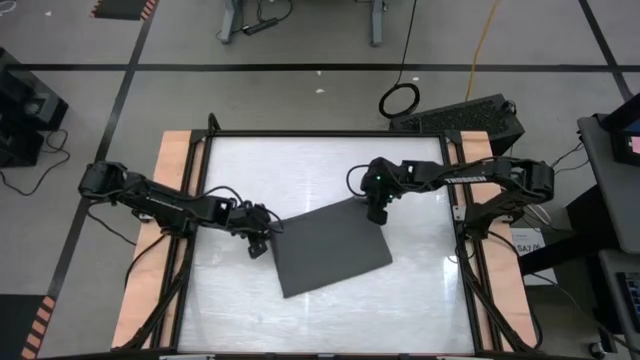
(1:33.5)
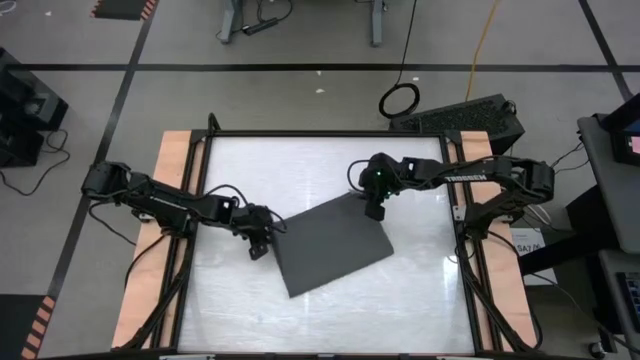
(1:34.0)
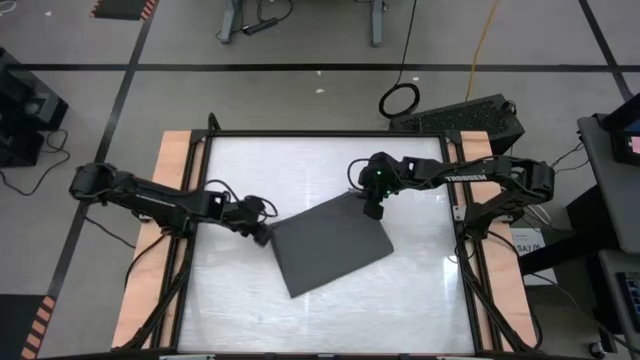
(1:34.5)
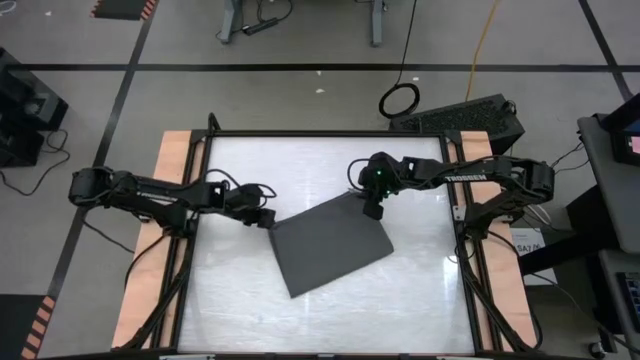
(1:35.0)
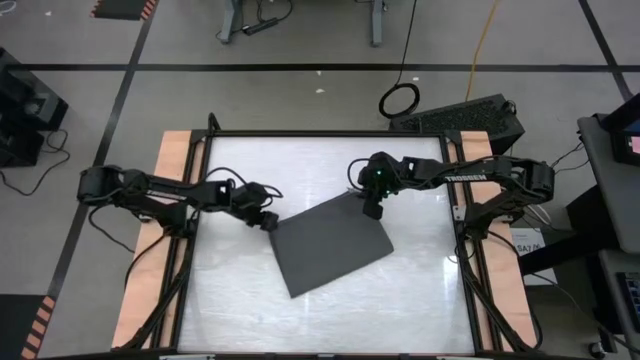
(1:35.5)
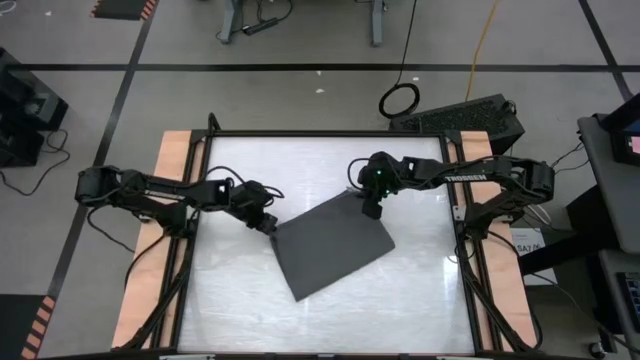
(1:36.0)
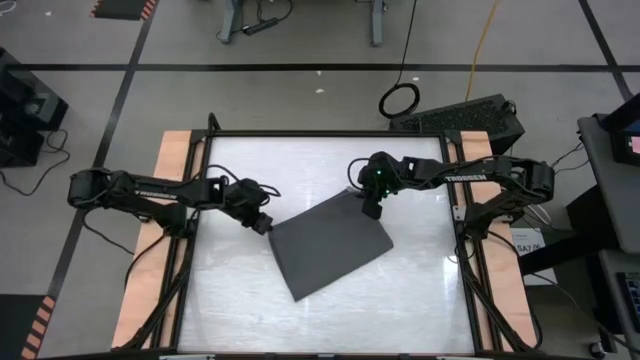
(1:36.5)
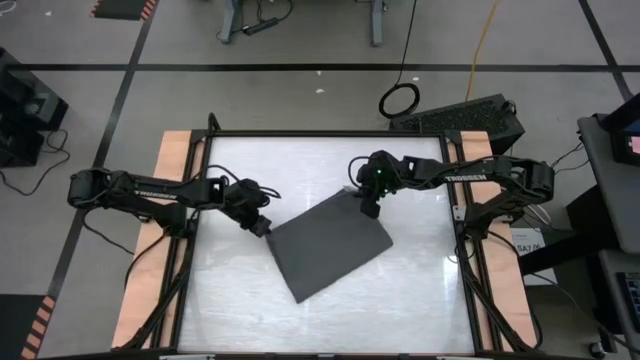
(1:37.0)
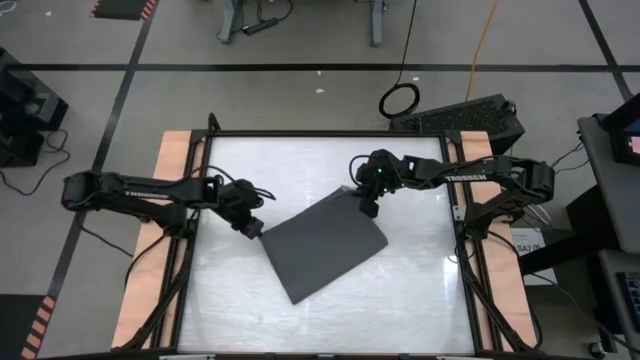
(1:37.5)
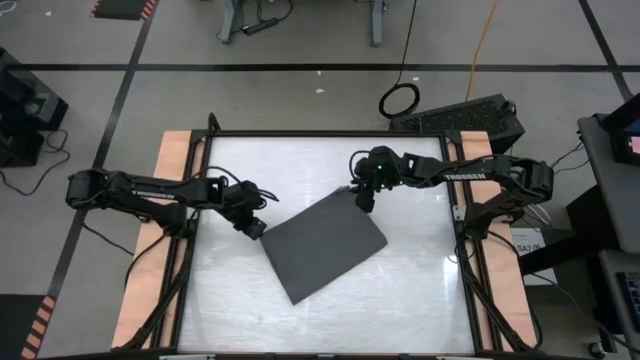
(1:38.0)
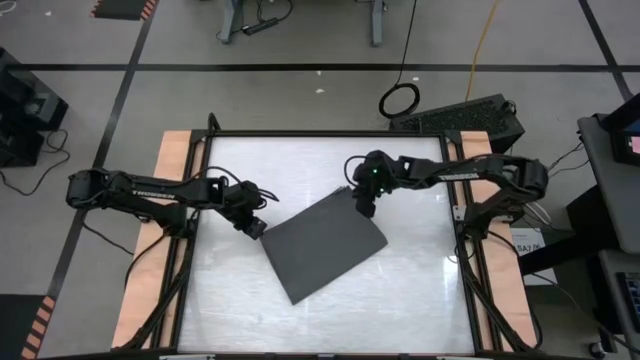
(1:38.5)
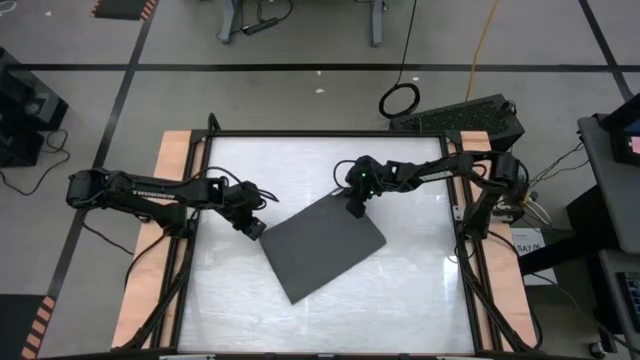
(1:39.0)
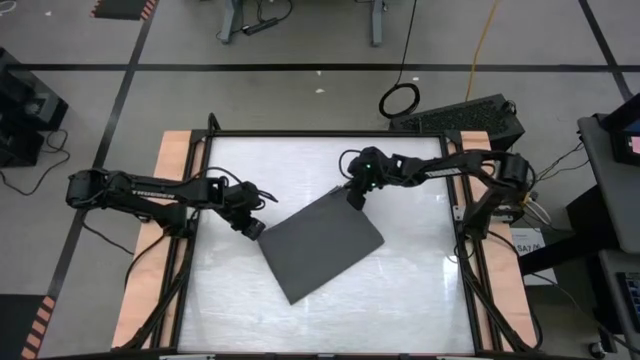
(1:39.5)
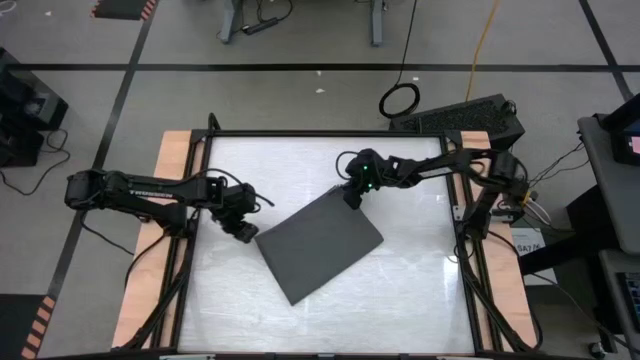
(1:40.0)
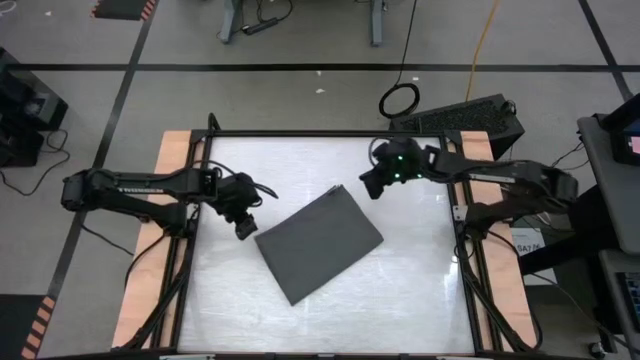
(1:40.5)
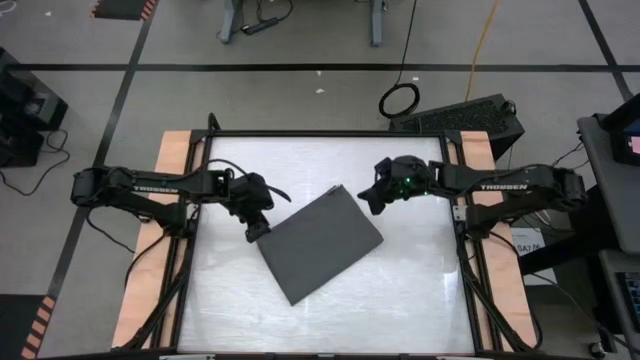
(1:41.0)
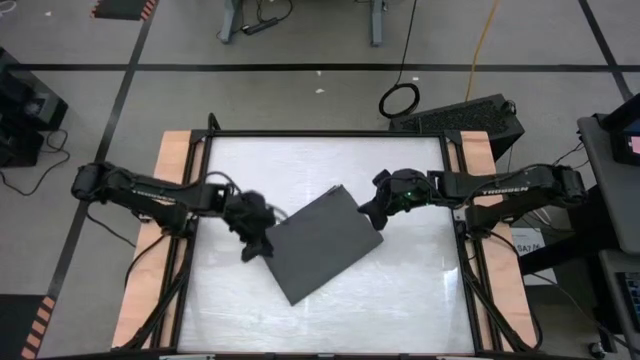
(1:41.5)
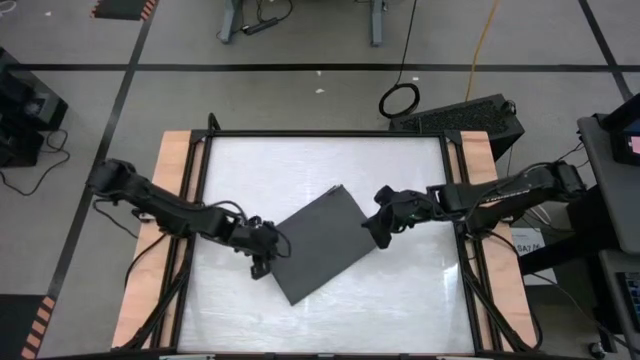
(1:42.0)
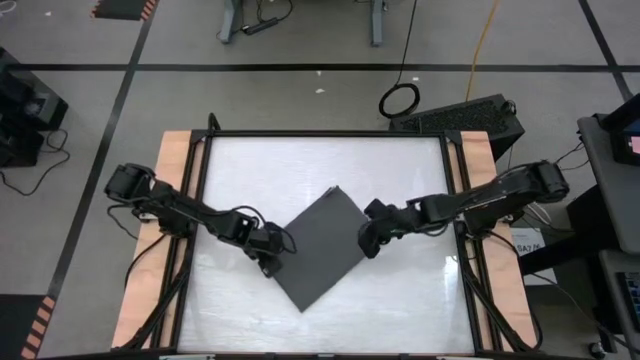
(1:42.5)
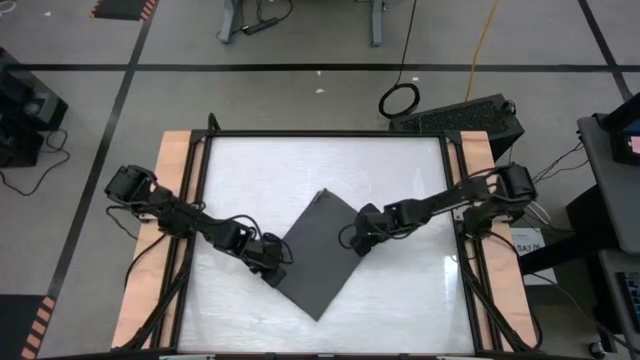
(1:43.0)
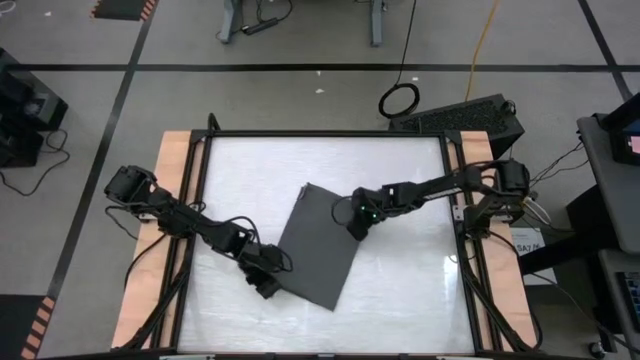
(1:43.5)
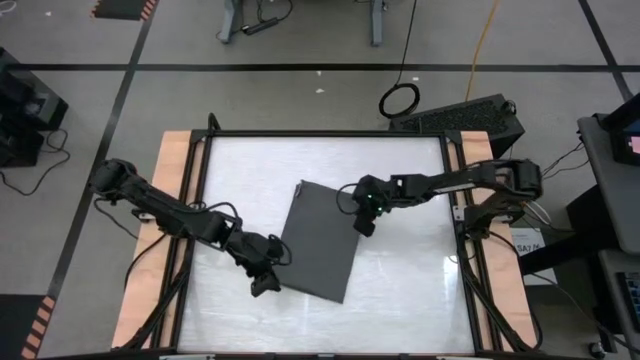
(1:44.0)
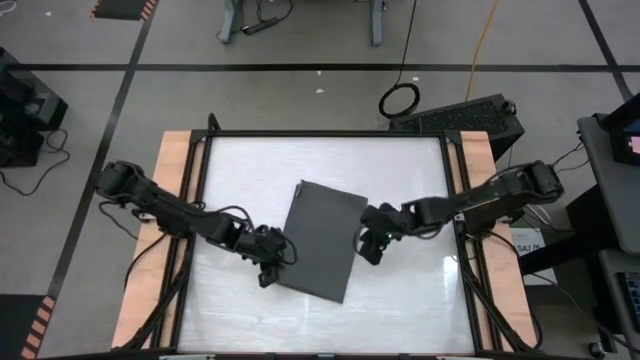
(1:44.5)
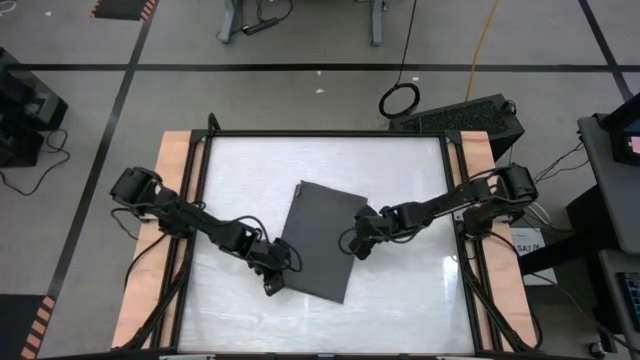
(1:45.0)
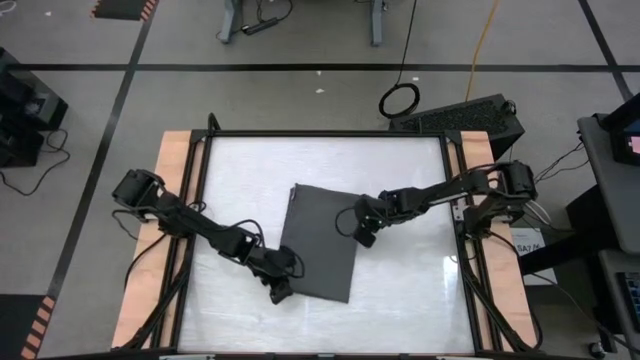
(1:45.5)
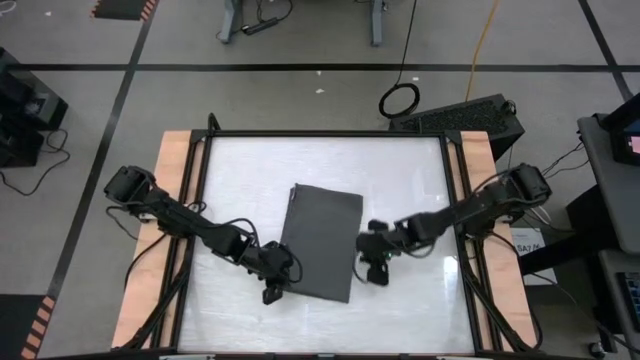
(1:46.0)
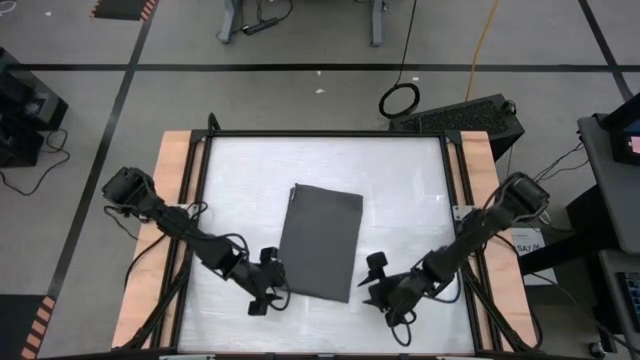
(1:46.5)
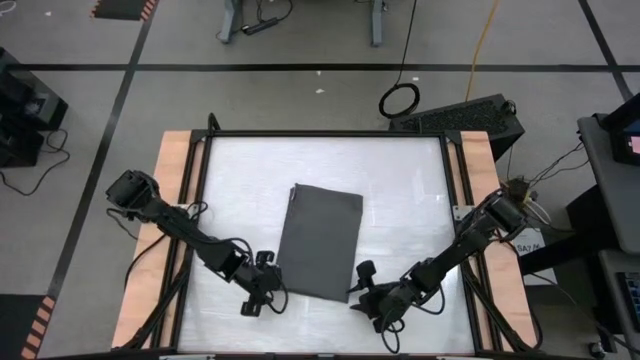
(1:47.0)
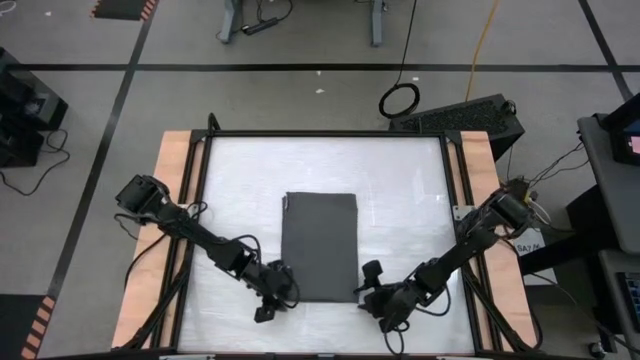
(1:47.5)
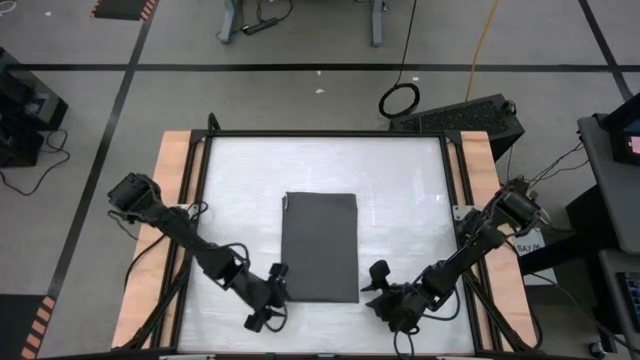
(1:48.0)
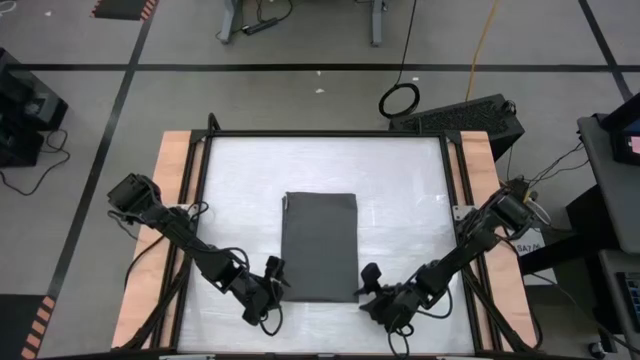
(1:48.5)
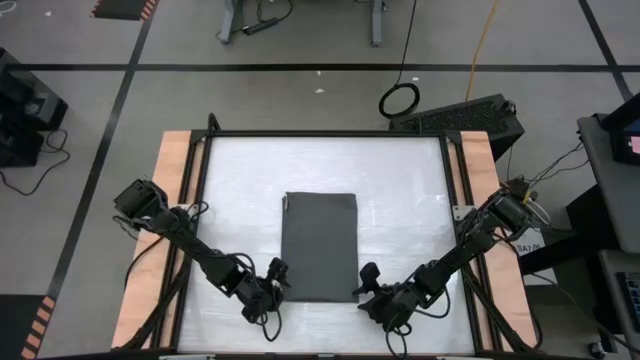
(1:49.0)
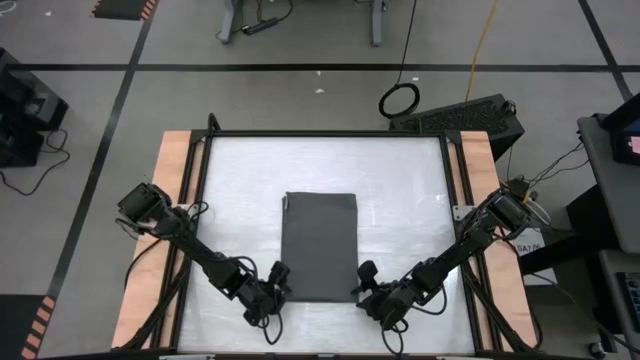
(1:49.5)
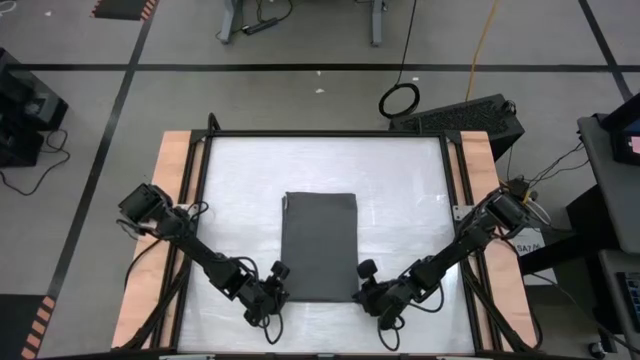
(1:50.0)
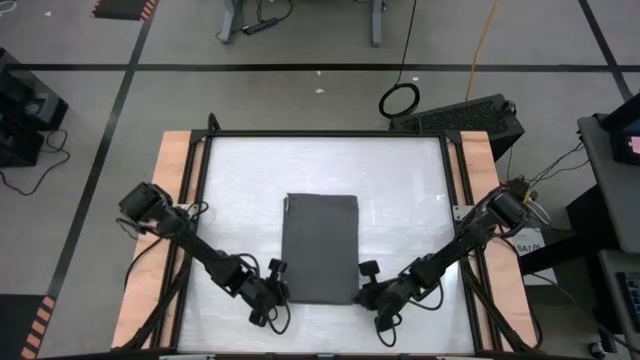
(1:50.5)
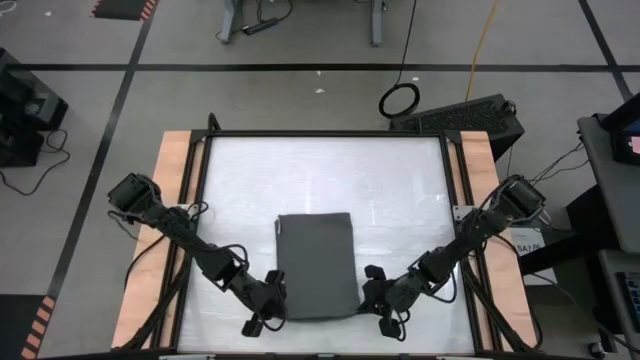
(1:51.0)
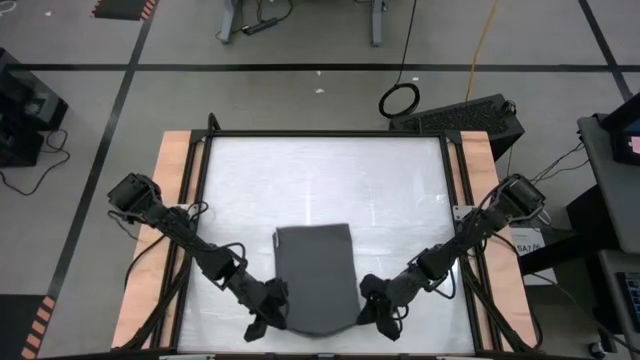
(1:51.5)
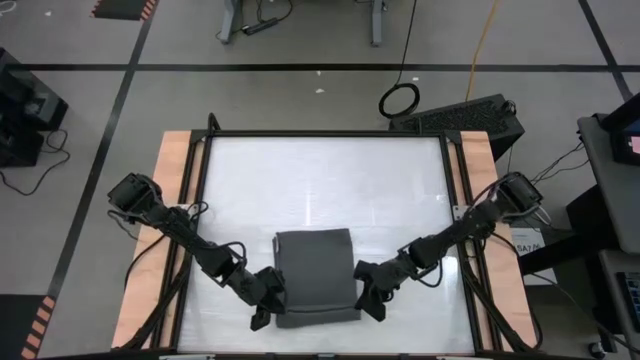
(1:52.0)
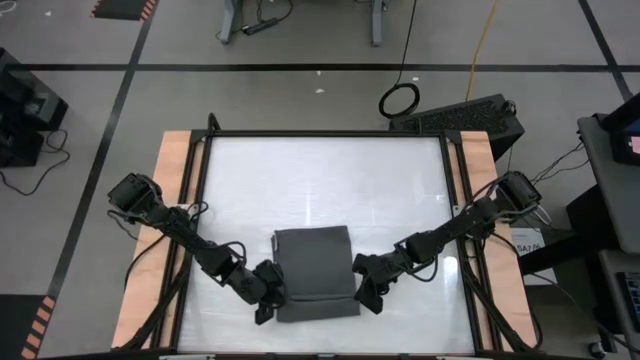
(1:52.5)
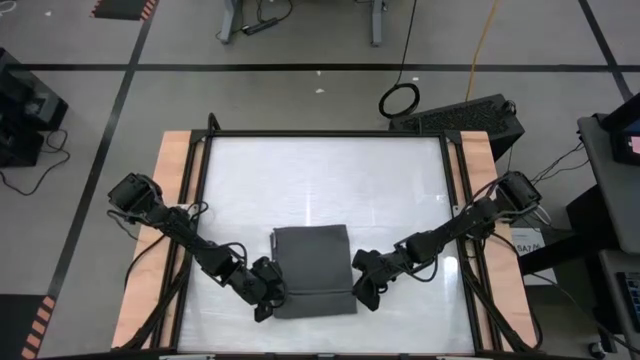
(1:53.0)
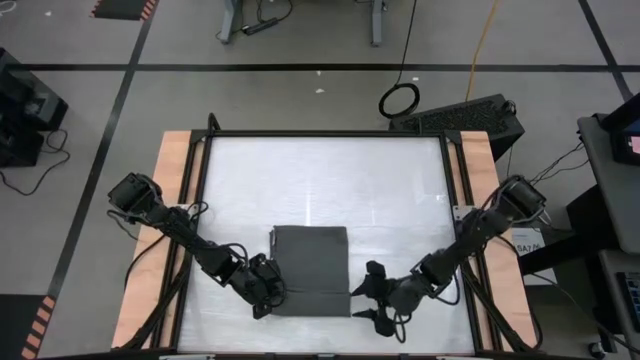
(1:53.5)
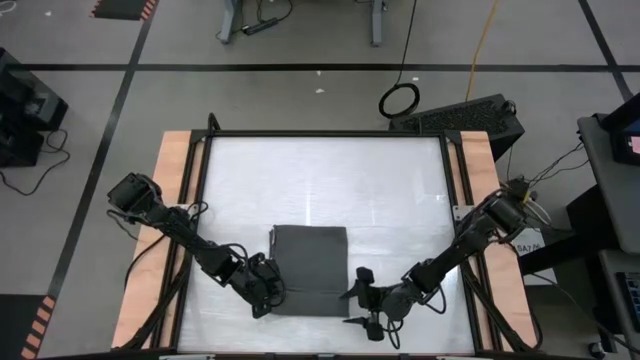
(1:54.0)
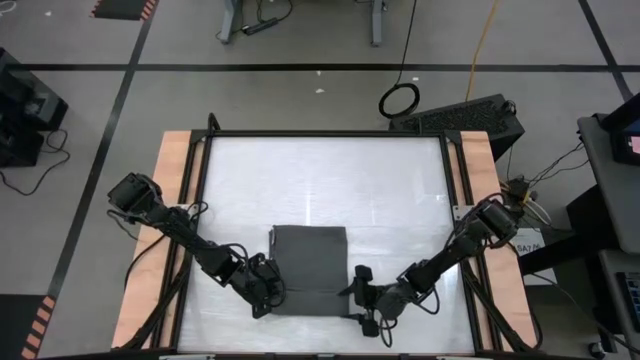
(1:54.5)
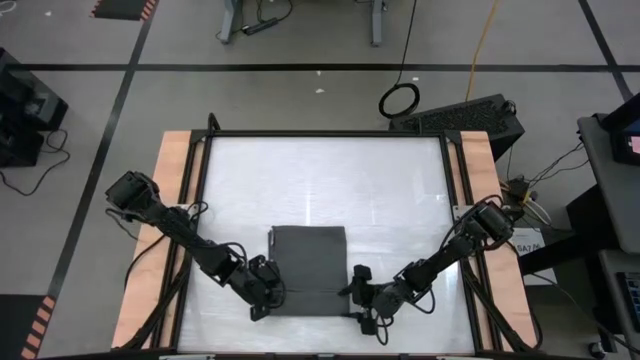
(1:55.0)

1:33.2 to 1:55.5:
Task: Roll towel
Roll the gray towel
